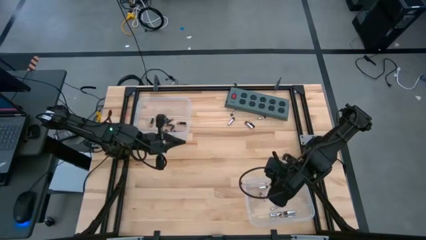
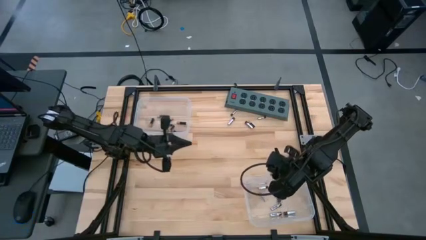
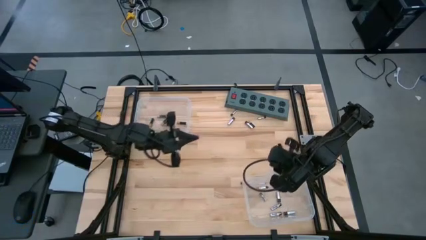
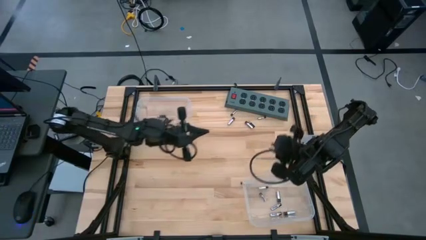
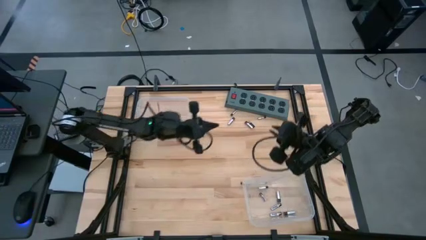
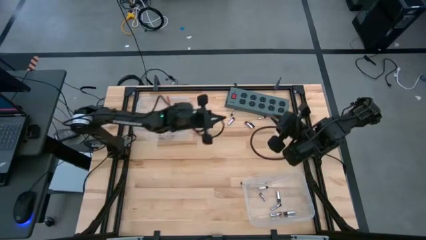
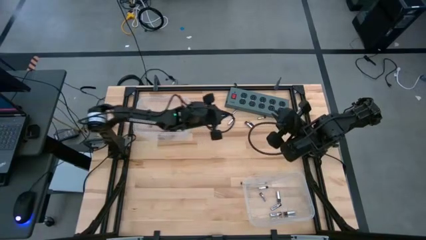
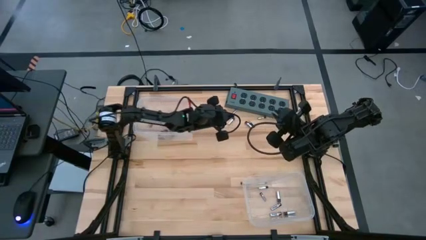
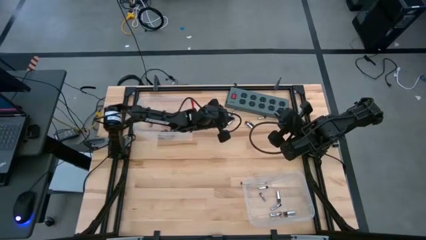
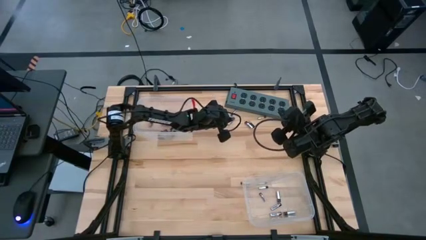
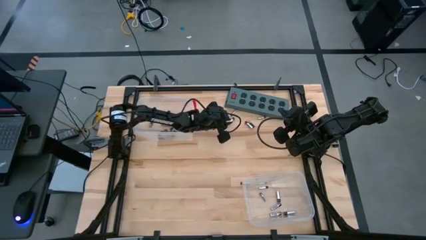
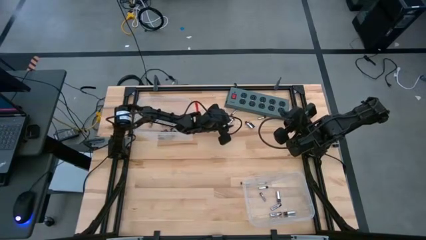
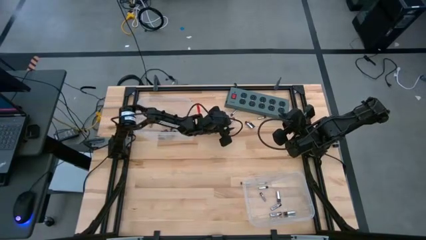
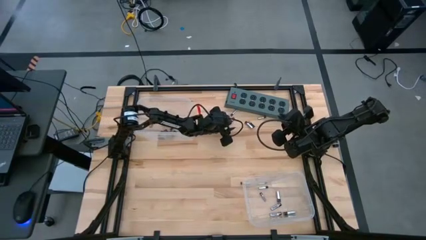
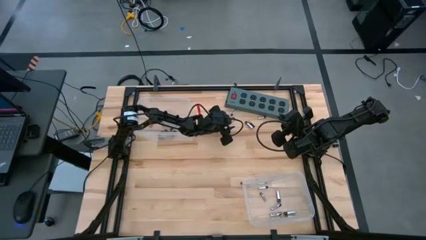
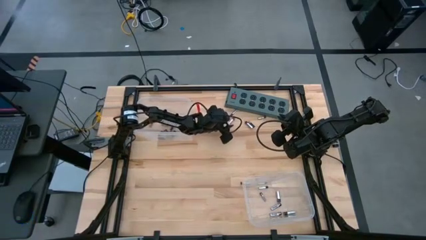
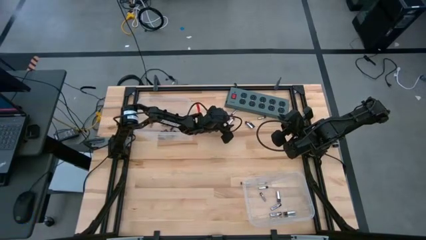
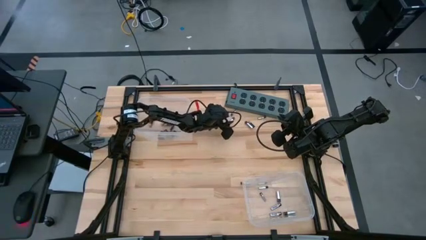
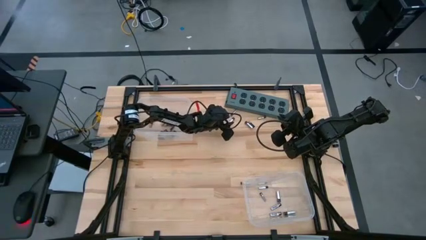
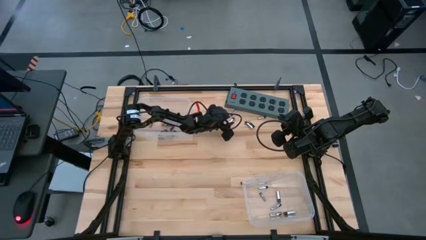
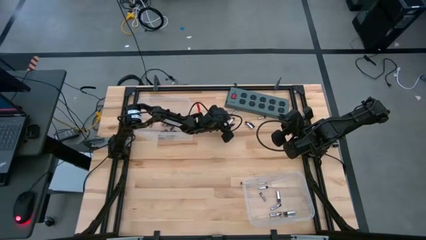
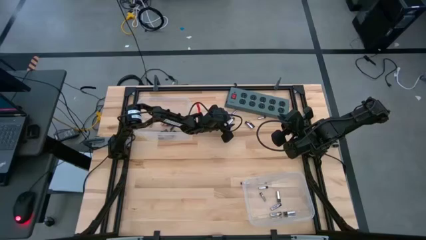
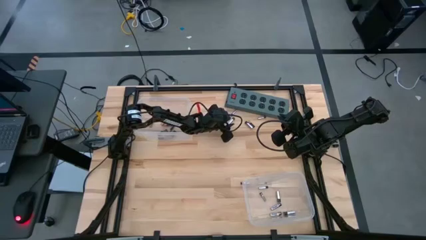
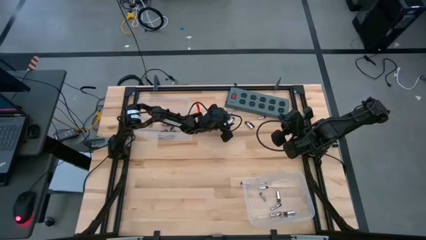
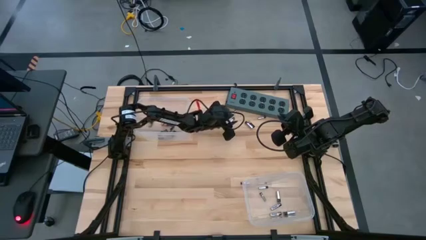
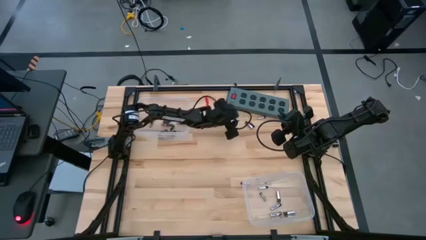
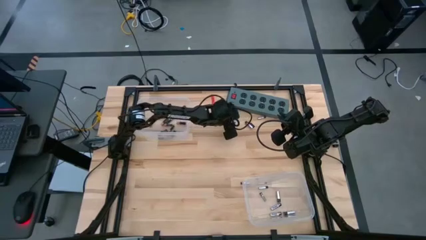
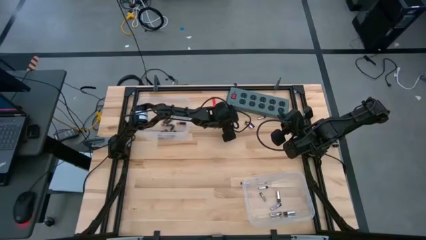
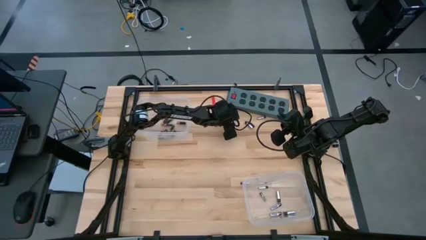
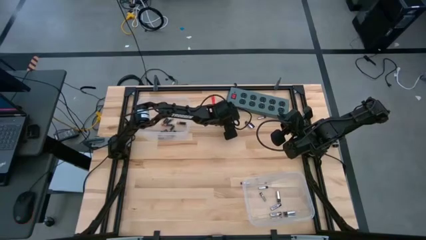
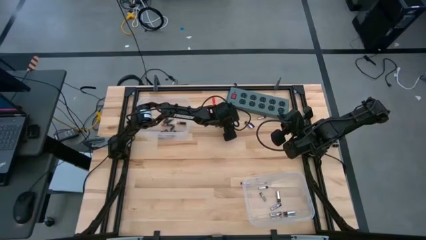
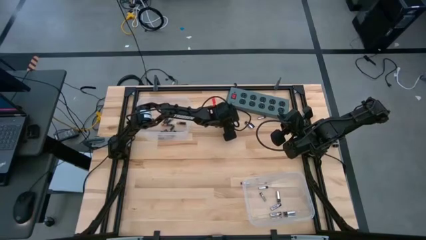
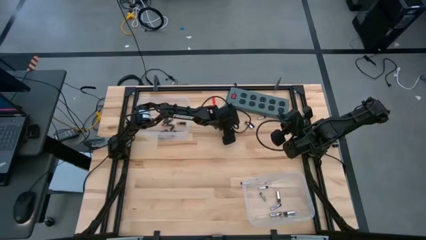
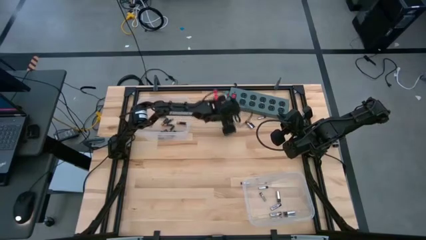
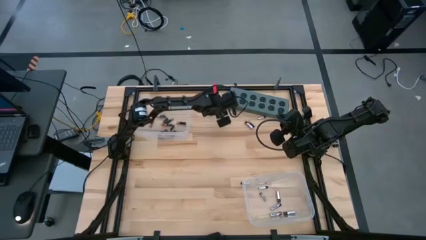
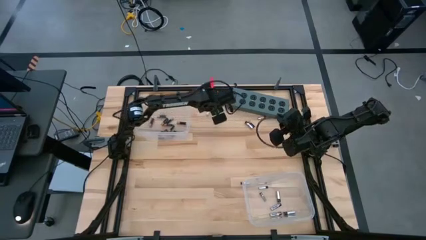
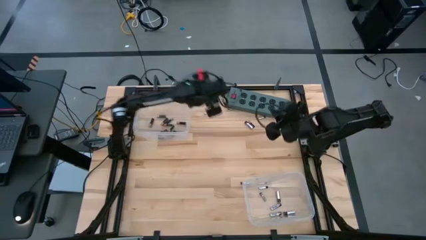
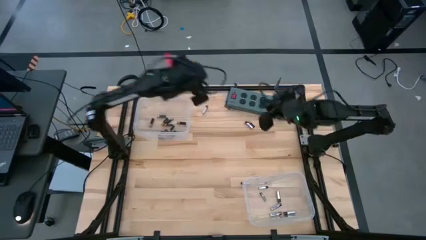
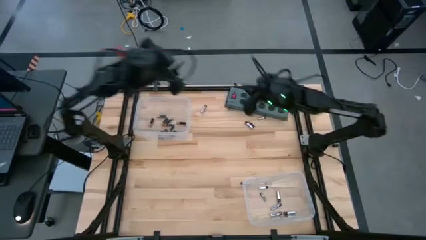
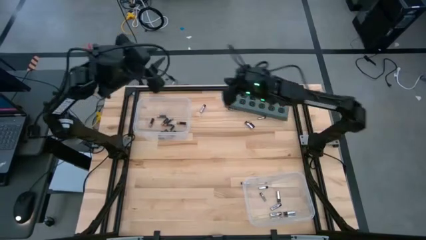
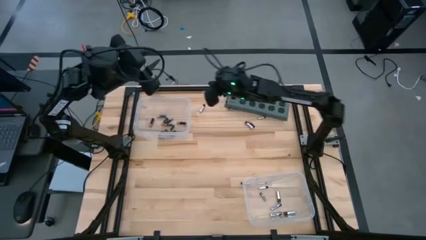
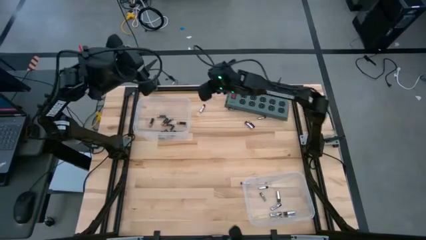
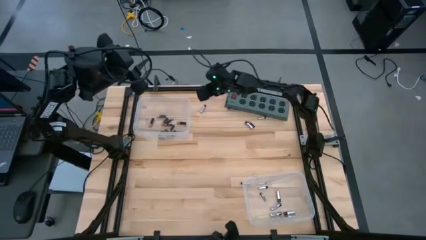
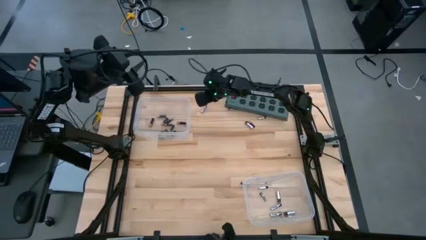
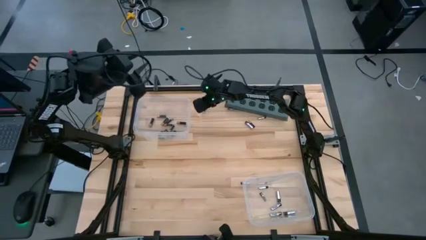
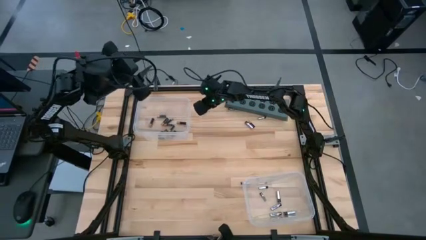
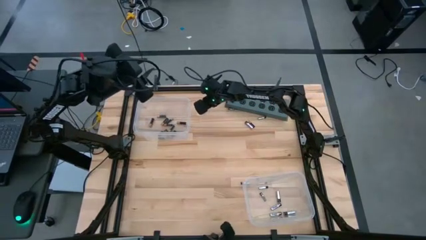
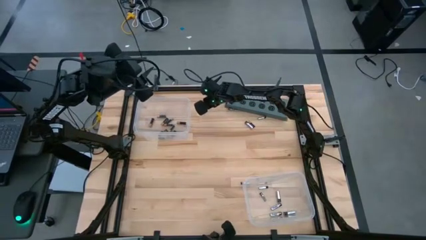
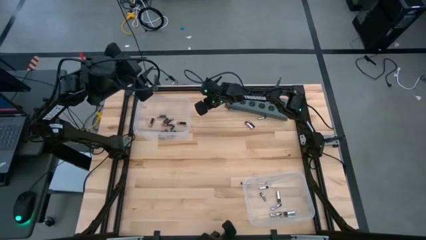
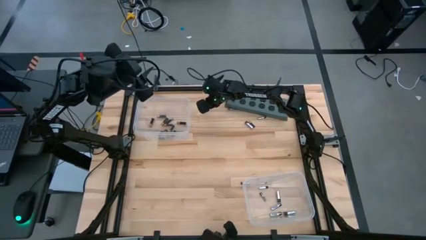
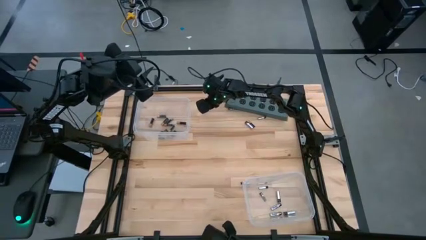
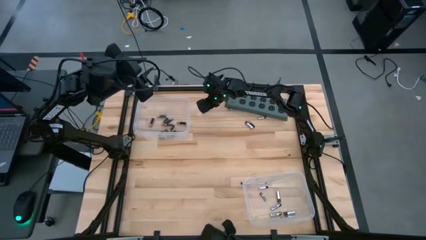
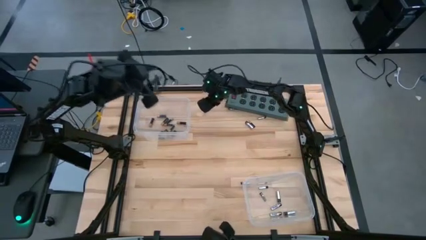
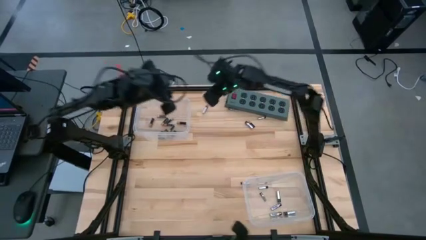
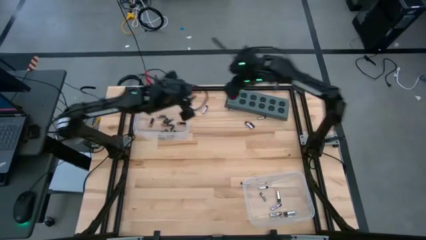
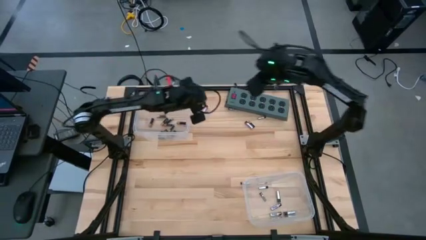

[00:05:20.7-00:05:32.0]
Task: Sort batteries
Put the silver battery into the bottom transparent bin

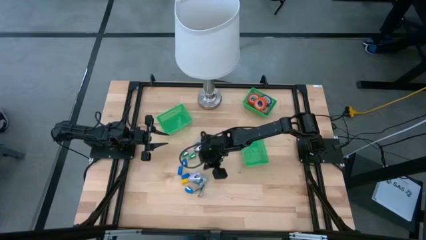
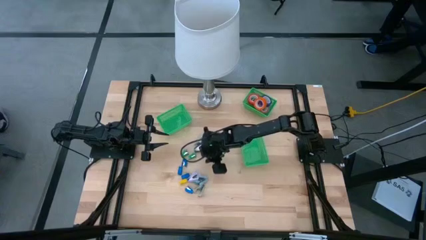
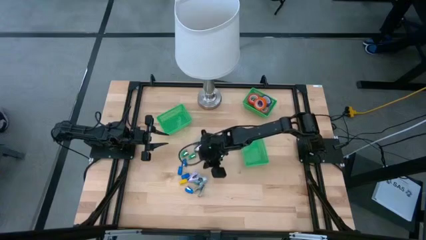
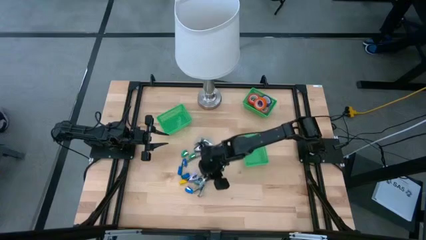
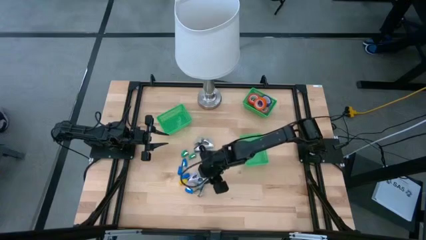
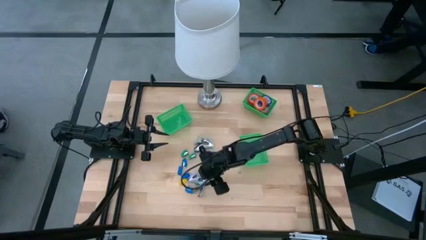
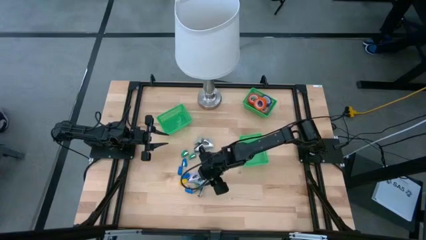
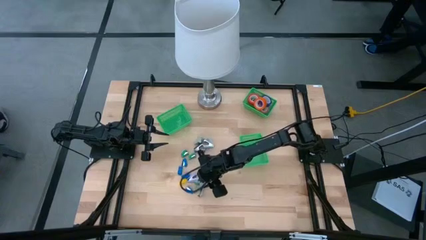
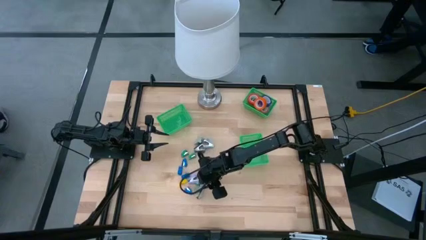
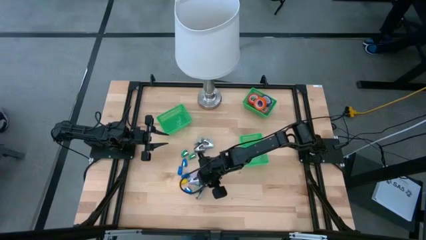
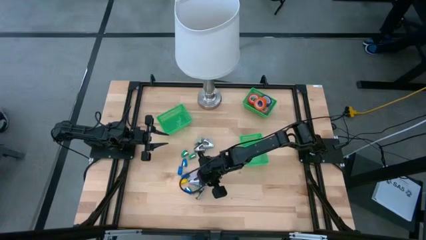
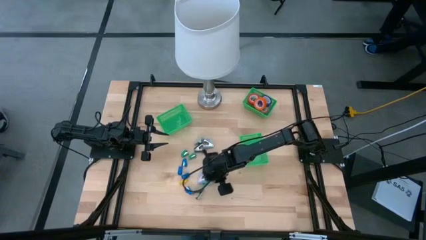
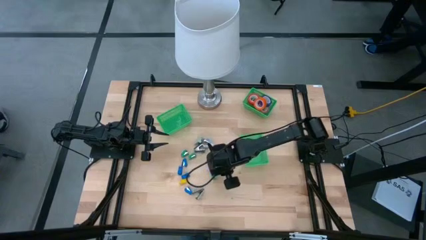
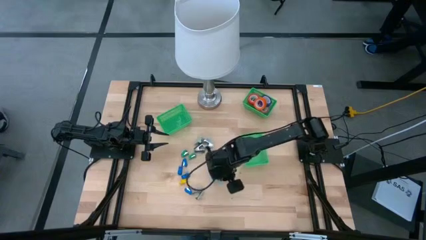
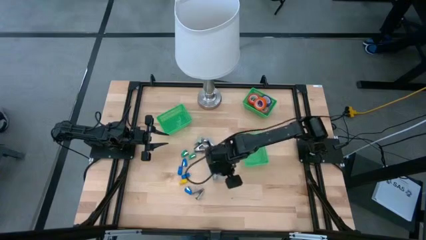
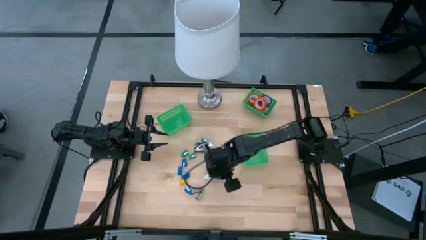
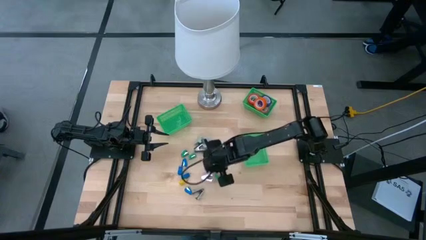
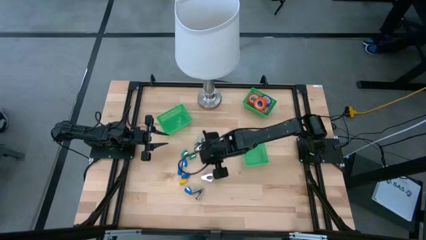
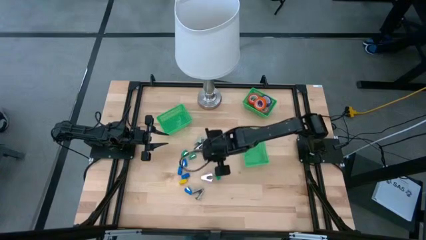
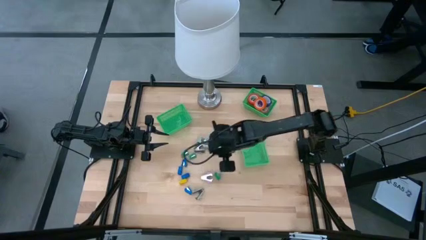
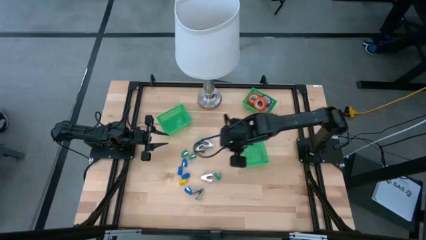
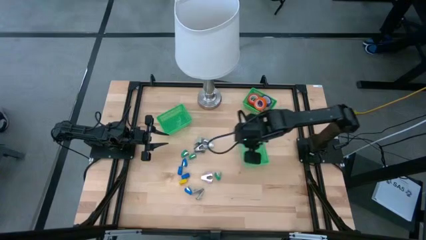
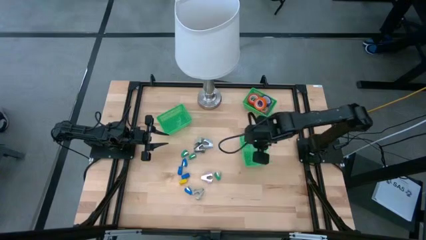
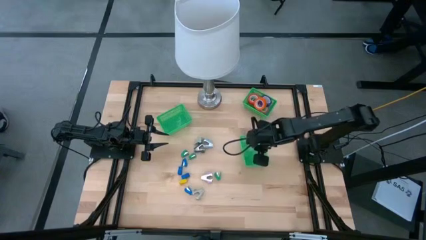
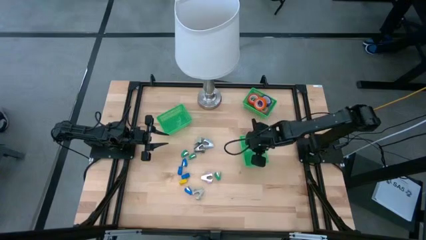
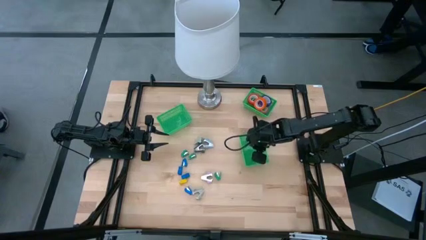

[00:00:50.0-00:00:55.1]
Task: Pick and place Stapler, Stapler remover, tape
Put the light blue staple remover into the bottom right green bin
